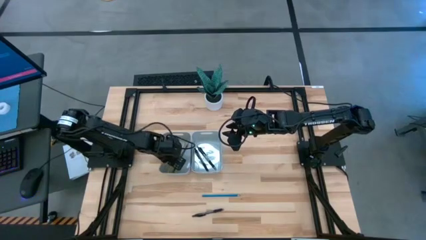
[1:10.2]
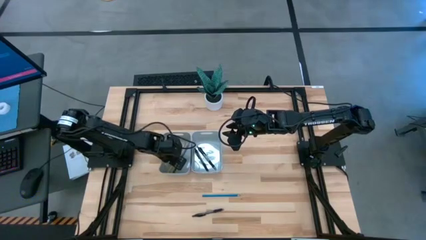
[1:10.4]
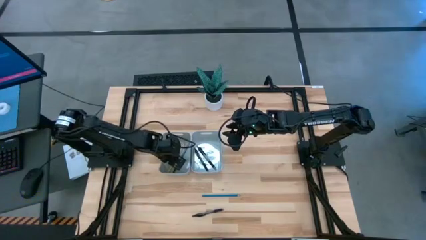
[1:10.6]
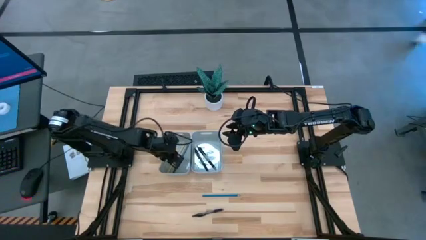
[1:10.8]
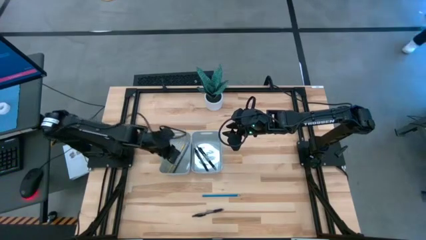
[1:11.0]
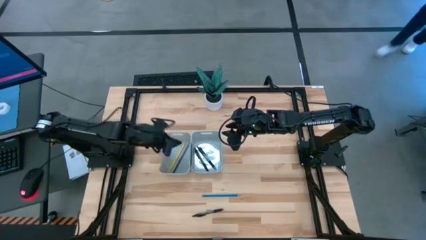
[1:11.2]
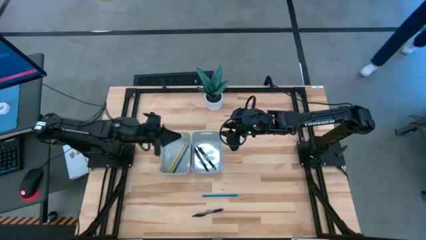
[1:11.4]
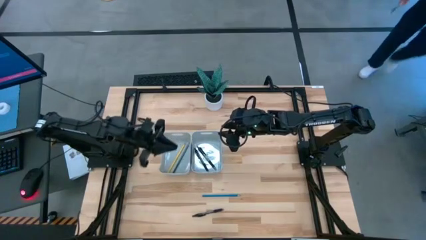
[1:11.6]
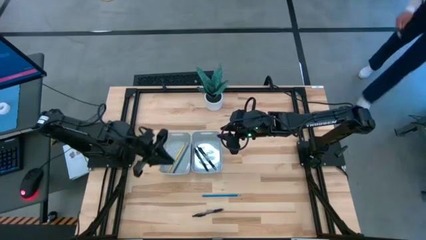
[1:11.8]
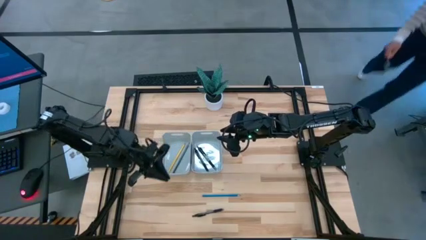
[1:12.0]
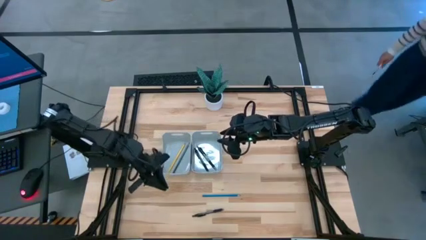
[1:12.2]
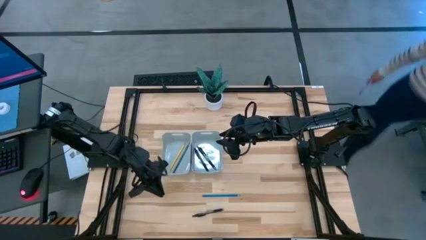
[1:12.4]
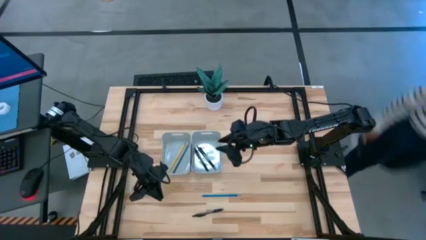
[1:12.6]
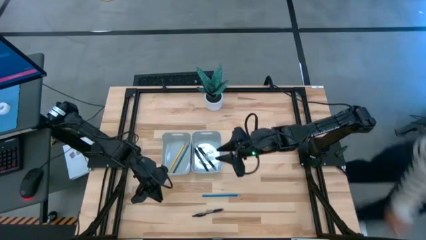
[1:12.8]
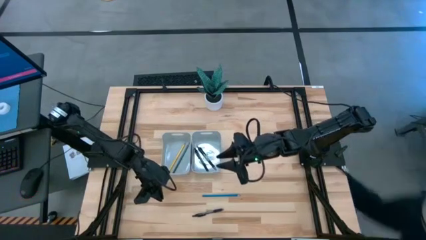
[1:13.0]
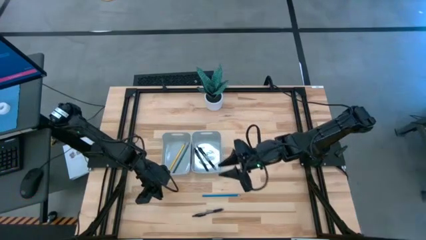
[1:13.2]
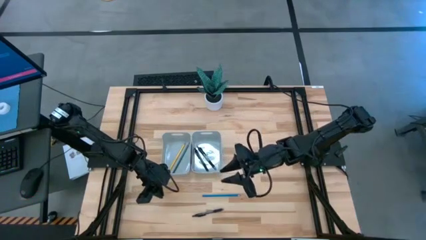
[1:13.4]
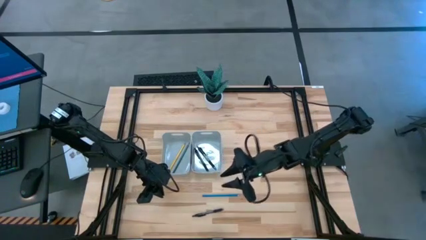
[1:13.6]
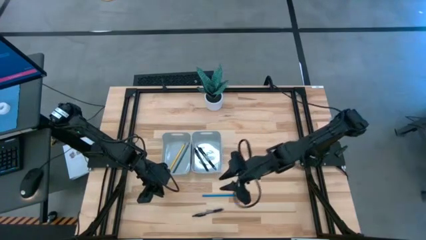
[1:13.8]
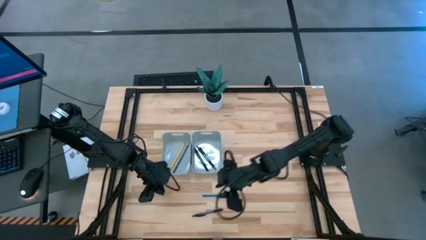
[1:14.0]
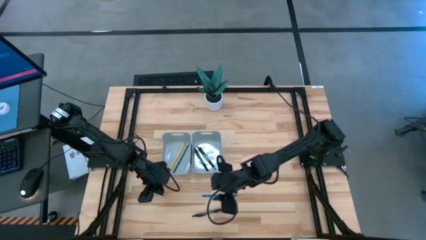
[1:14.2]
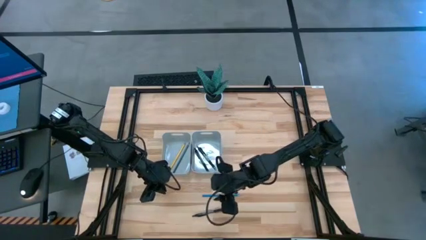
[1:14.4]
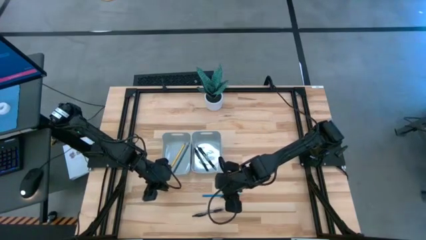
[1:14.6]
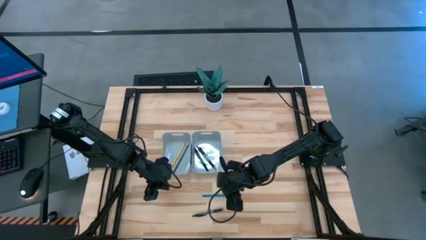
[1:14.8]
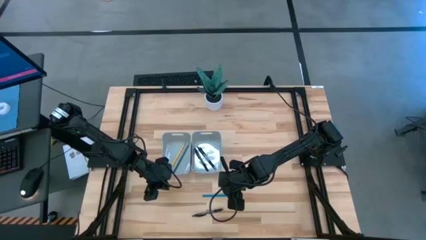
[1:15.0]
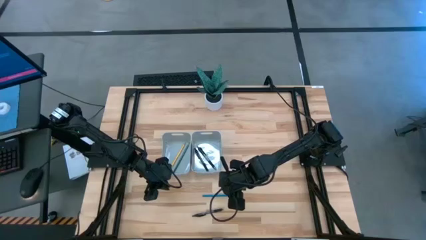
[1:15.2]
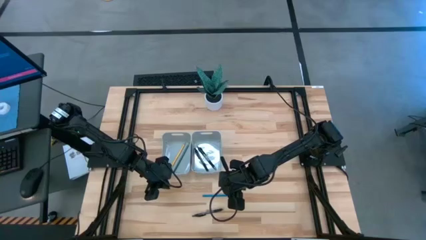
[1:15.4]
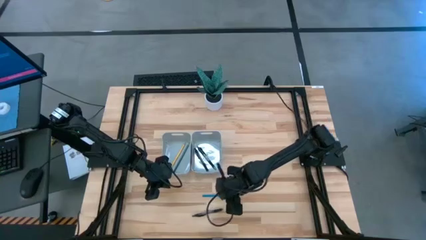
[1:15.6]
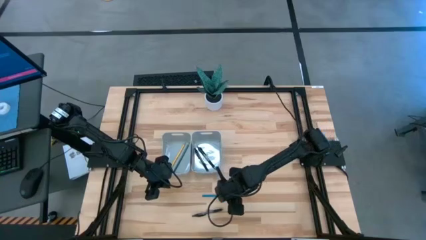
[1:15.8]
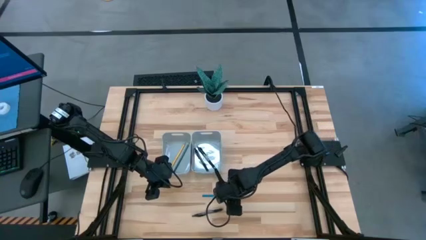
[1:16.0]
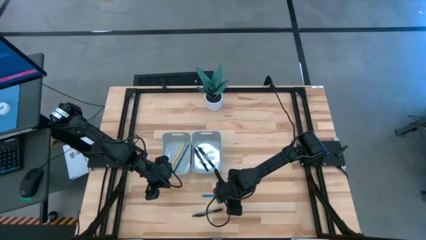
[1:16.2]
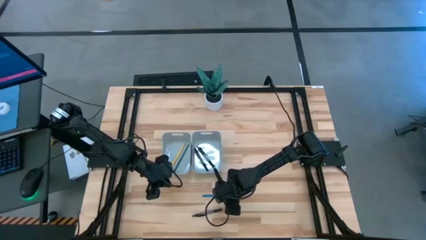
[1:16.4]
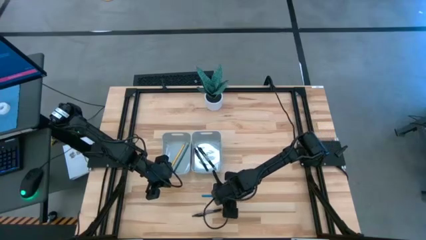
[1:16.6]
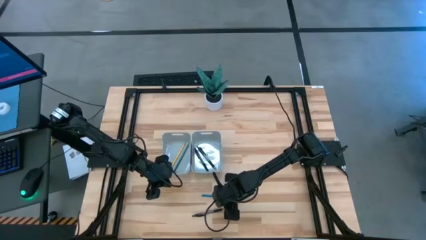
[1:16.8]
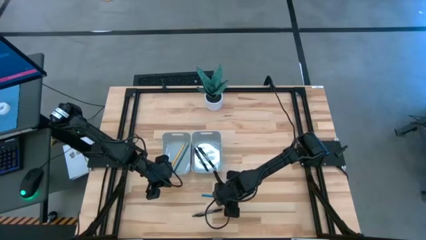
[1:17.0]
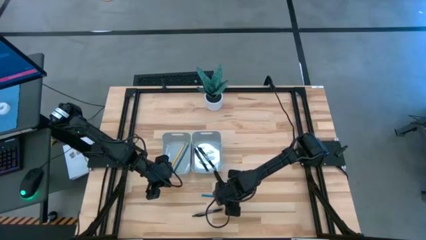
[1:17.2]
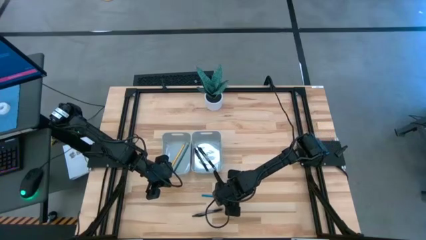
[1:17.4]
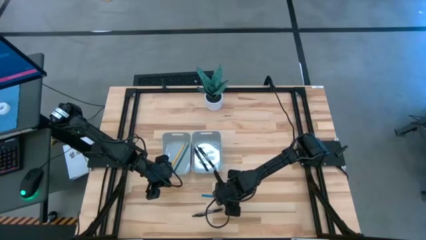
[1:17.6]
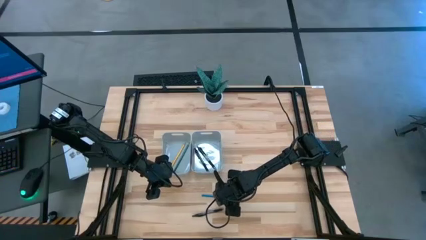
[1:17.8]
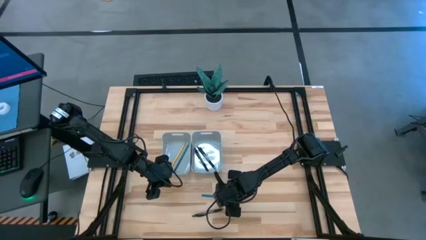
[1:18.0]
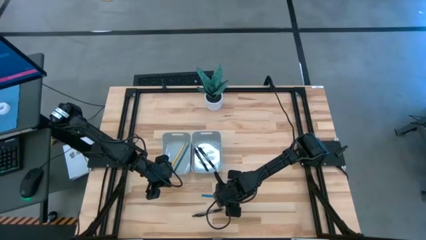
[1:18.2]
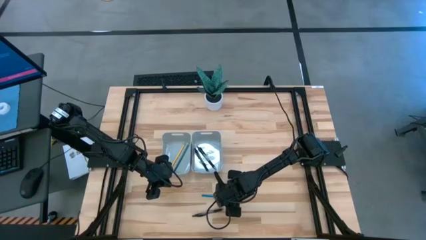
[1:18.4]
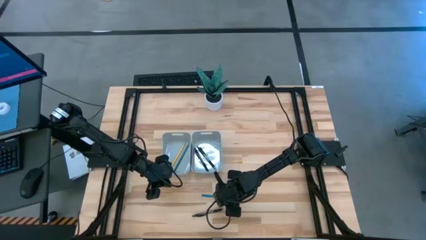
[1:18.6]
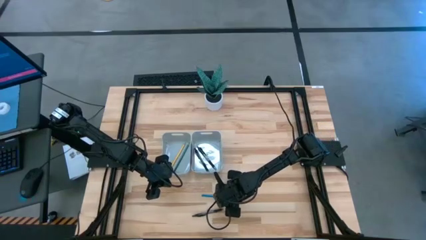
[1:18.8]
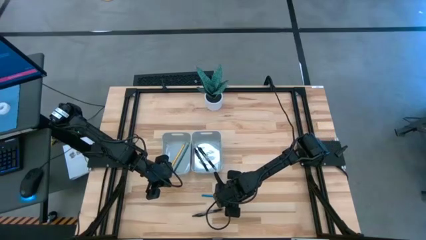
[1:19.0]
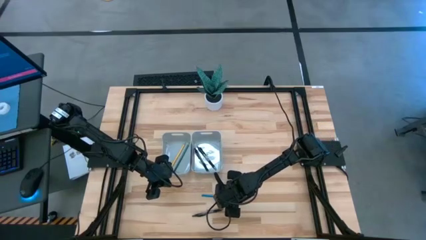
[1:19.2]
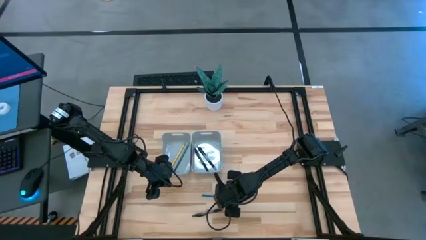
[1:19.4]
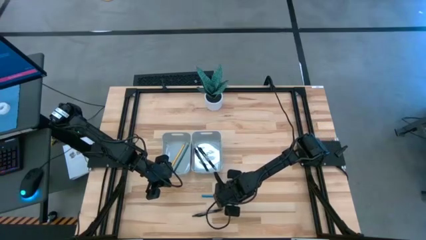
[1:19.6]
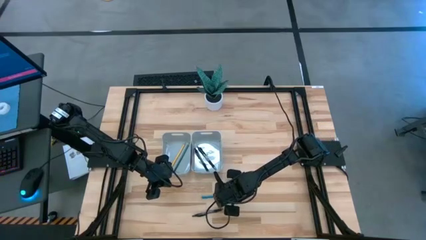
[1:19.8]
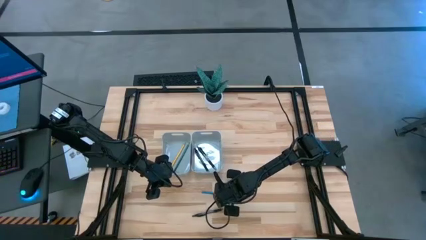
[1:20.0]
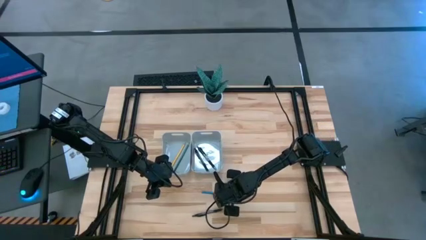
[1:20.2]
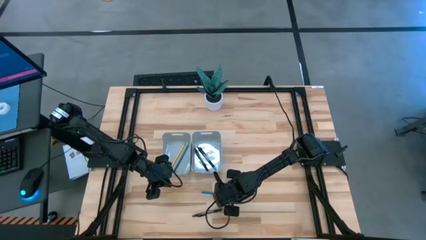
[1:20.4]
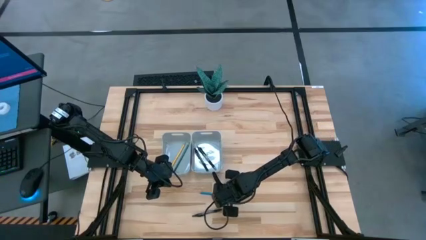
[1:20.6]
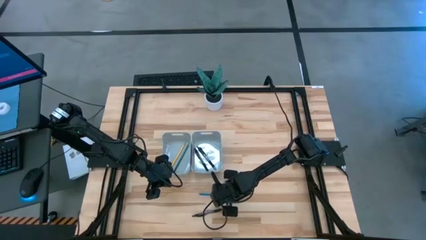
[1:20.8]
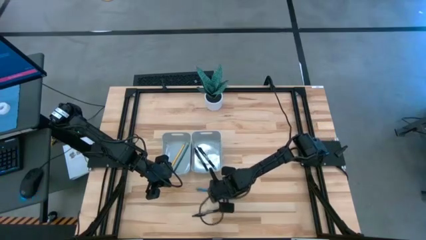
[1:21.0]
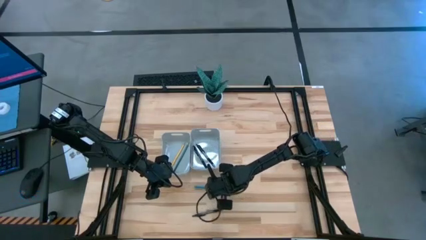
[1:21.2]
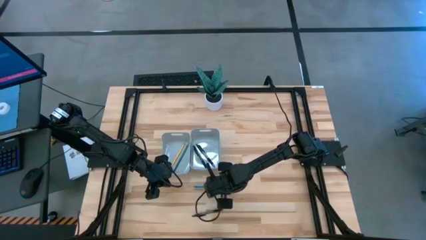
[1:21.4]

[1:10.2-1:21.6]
Task: Sort pens & pencils
Put the blue pencil into the left gray bin

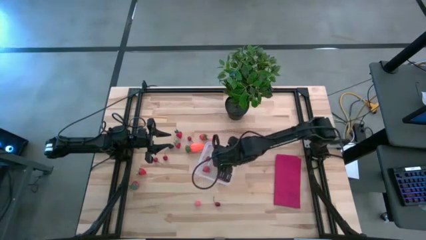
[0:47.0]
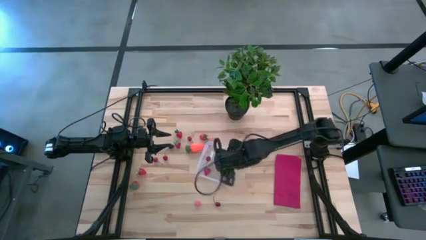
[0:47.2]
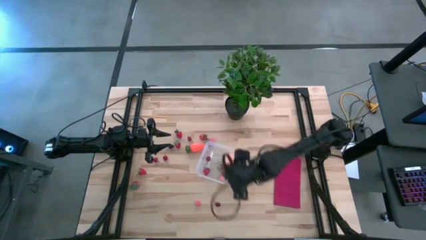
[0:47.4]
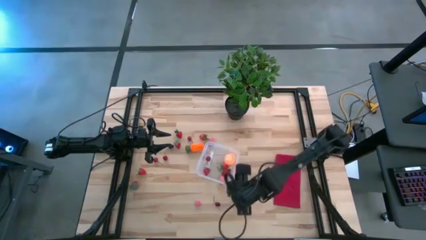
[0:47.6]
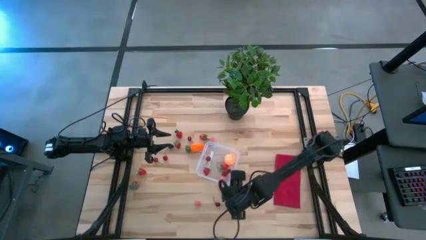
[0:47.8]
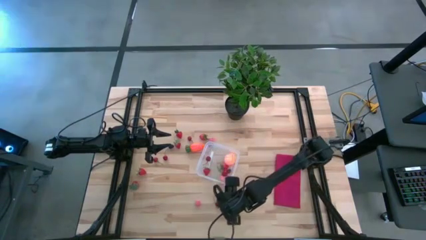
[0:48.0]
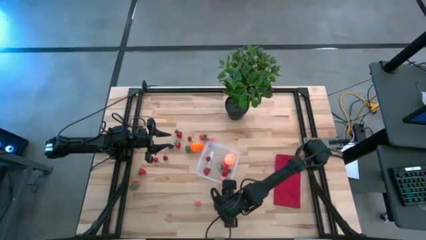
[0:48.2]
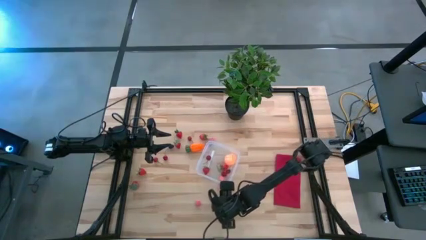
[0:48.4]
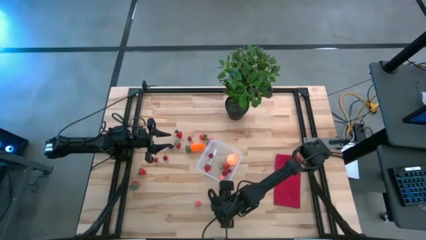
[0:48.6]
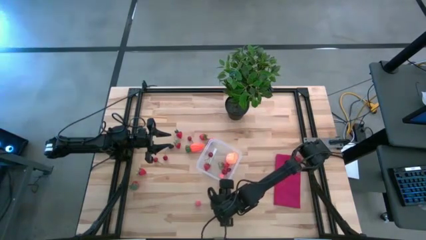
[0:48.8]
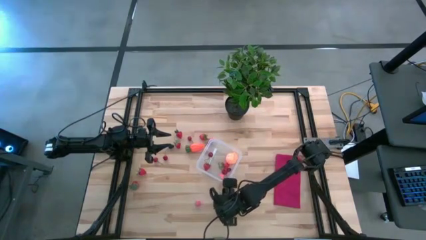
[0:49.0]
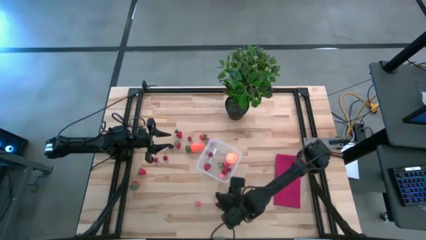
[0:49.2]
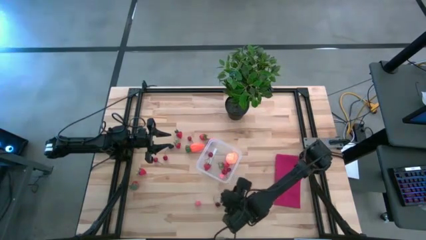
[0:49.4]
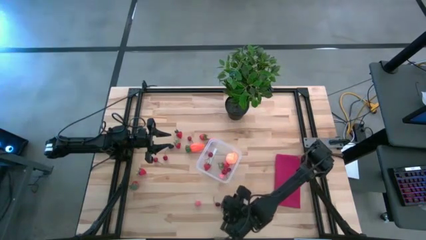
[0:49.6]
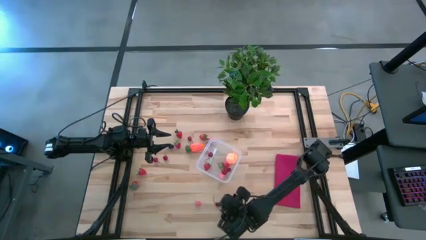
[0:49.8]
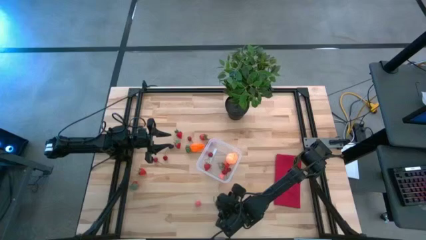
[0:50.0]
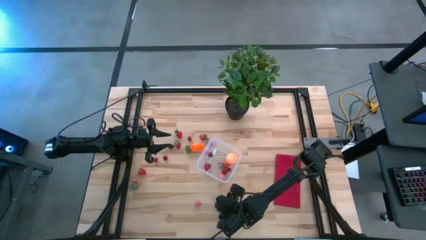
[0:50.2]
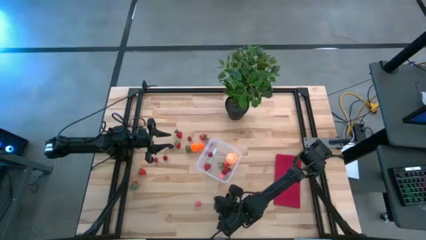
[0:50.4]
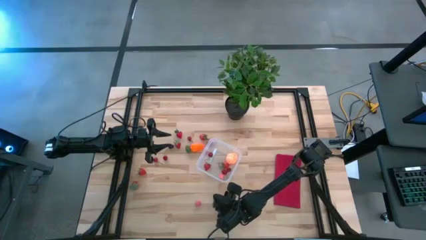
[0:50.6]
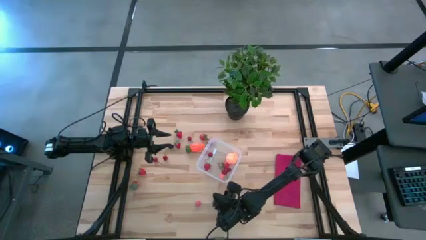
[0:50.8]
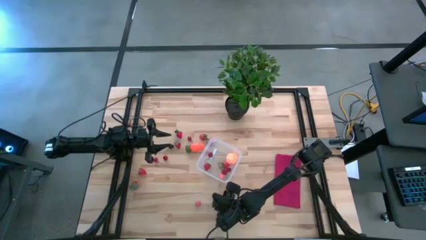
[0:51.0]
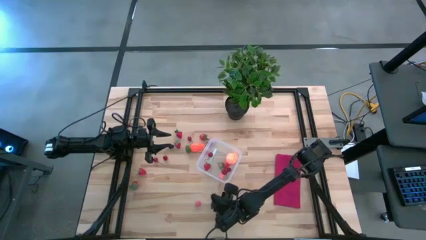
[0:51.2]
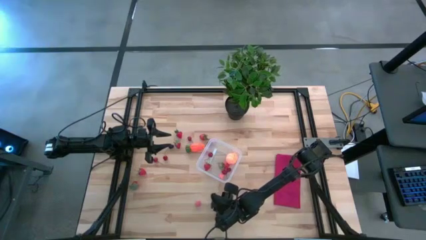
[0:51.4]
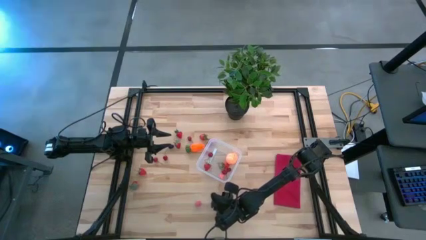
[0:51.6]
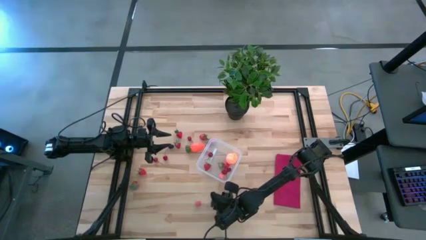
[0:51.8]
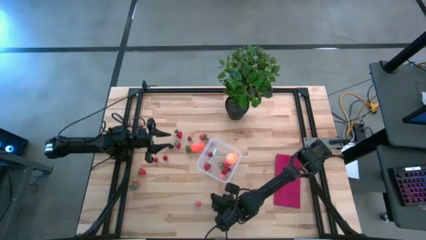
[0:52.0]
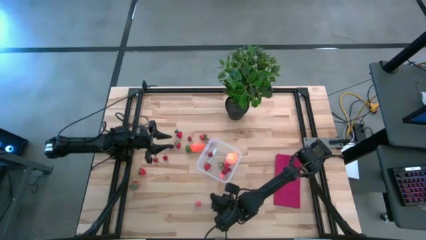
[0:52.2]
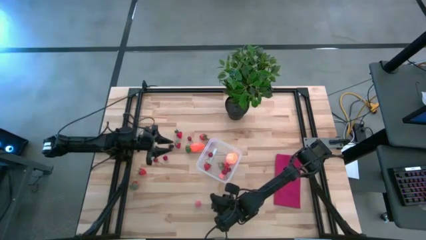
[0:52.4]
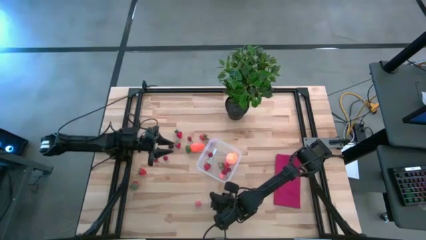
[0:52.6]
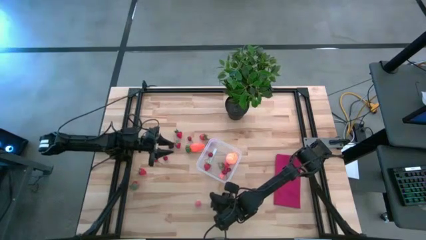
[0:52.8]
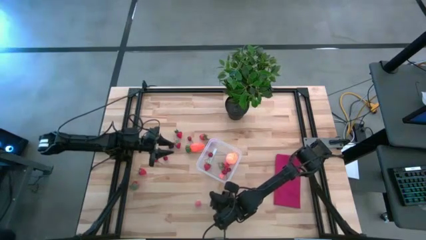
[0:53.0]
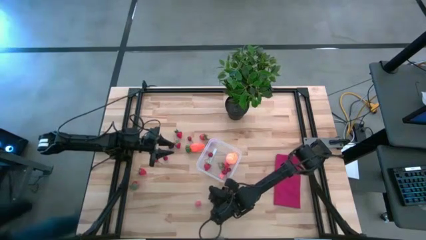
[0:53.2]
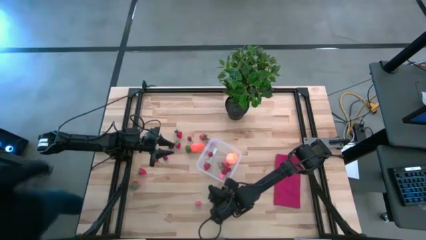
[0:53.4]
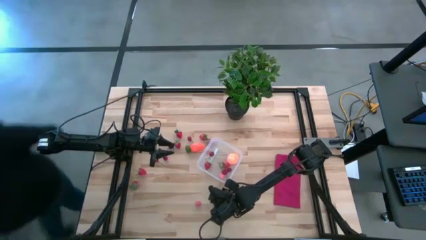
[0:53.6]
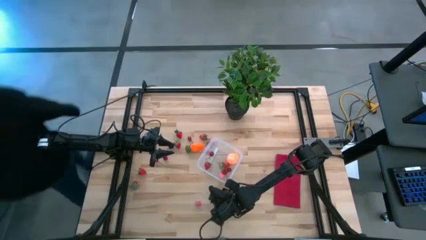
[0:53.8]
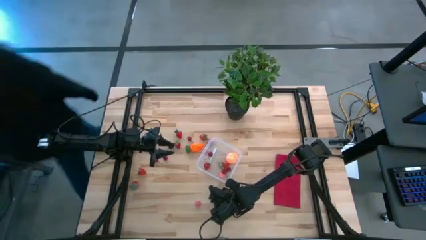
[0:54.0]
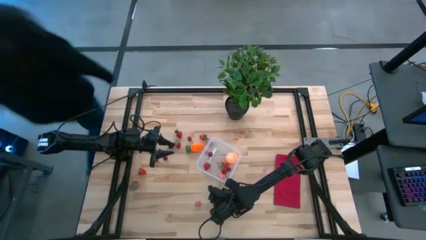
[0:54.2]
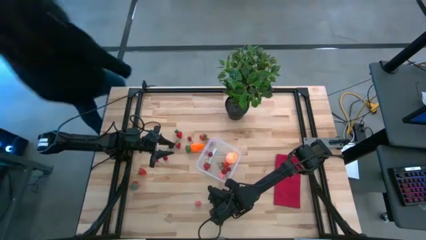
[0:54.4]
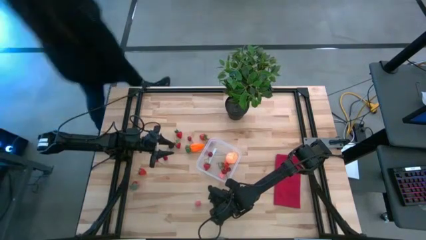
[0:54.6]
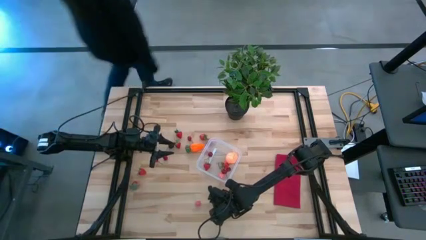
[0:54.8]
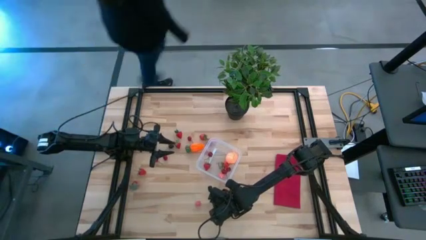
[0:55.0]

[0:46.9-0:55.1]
Task: Pick and placing Produce into tupperware
Put the red cherry into the transparent bin
